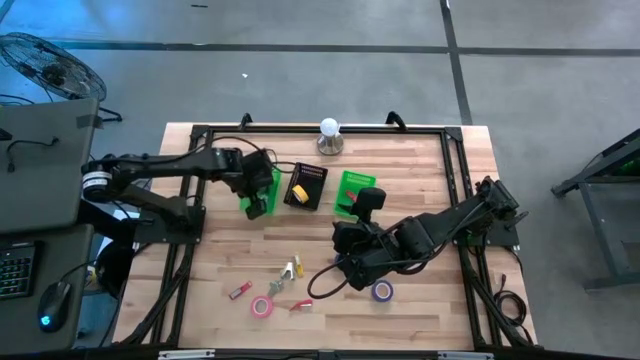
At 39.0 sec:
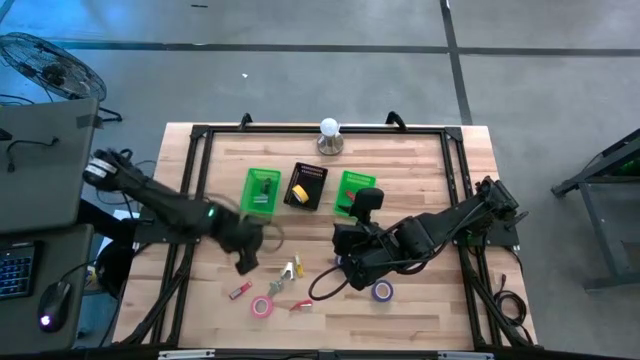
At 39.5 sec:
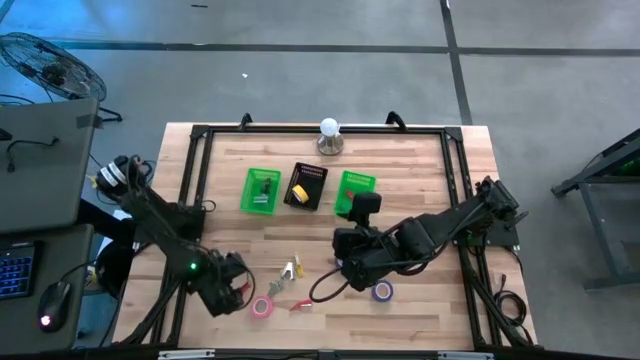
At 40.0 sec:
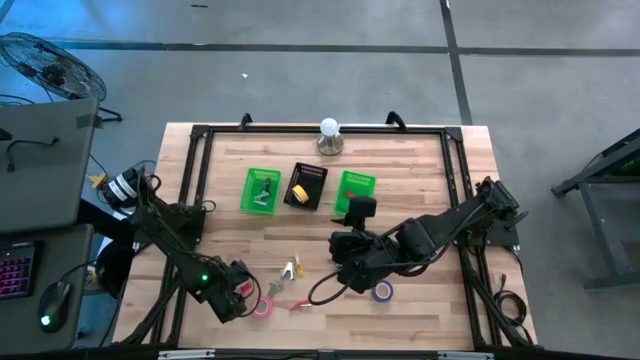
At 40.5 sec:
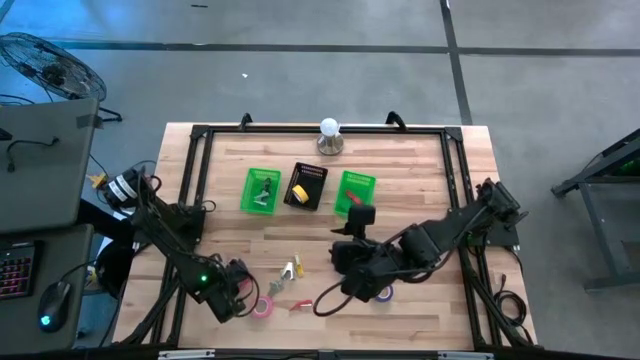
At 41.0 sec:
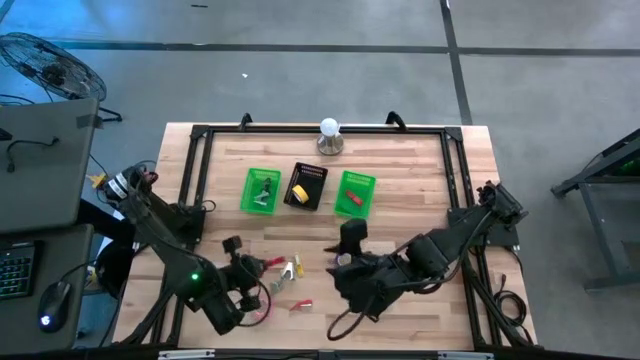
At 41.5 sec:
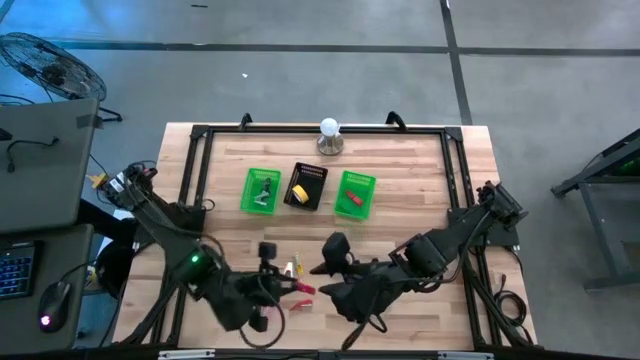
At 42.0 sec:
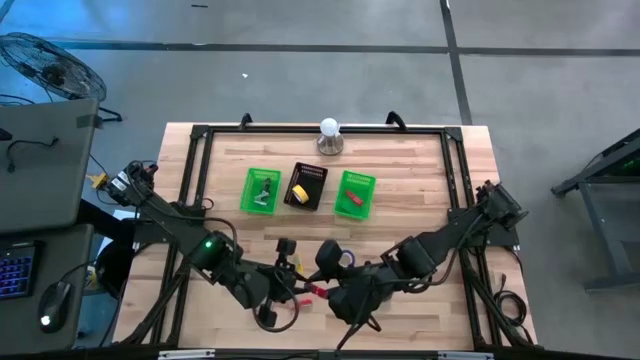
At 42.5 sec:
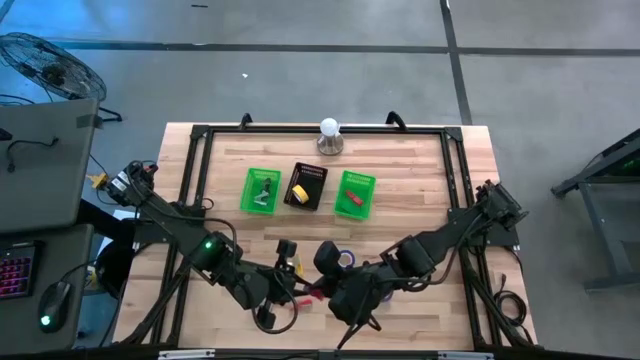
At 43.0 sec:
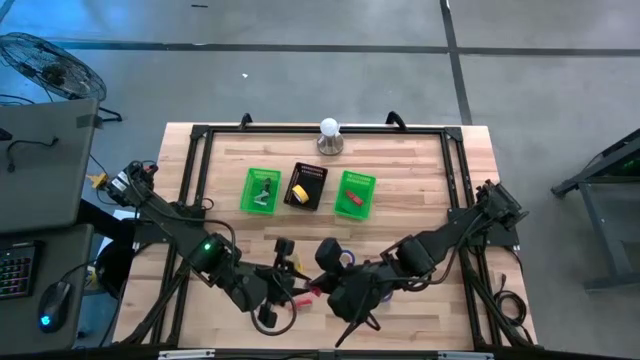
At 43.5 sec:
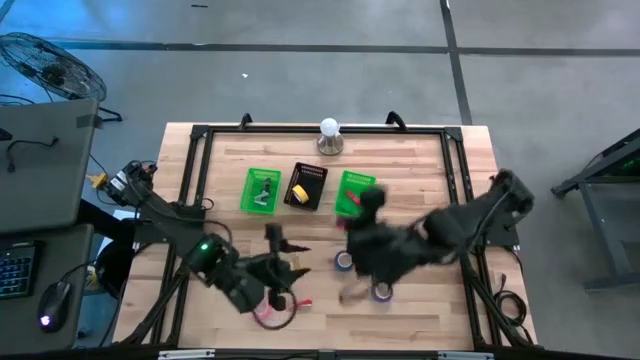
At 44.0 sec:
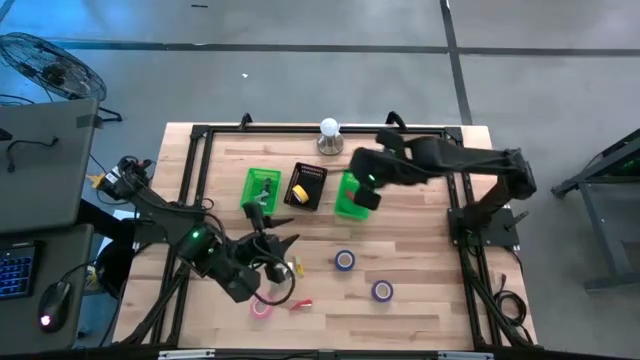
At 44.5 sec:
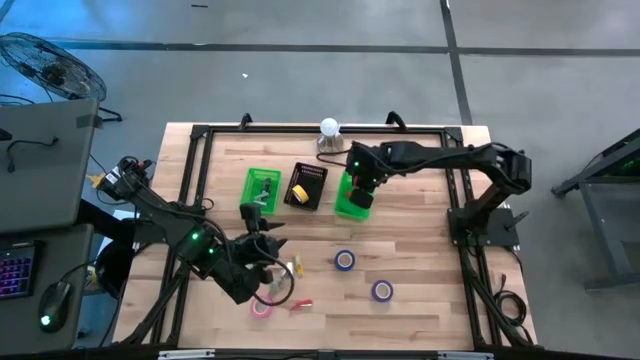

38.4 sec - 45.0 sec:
Task: Pick and place Stapler, Stapler remover, tape
Put the left red stapler into the right green bin

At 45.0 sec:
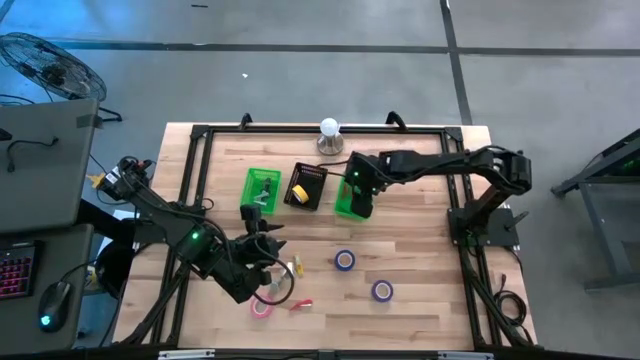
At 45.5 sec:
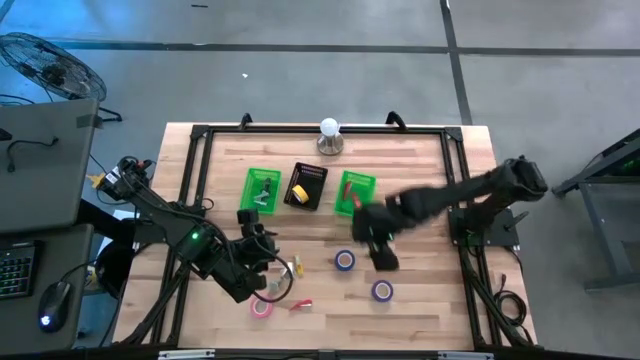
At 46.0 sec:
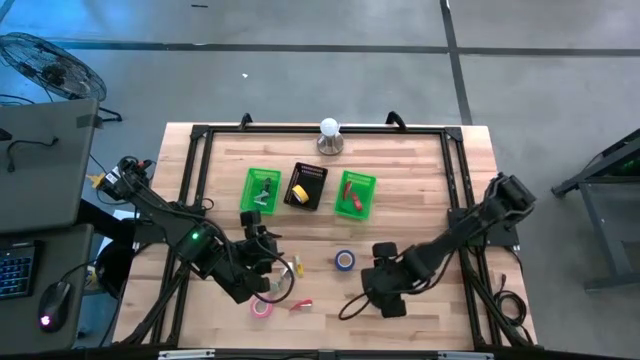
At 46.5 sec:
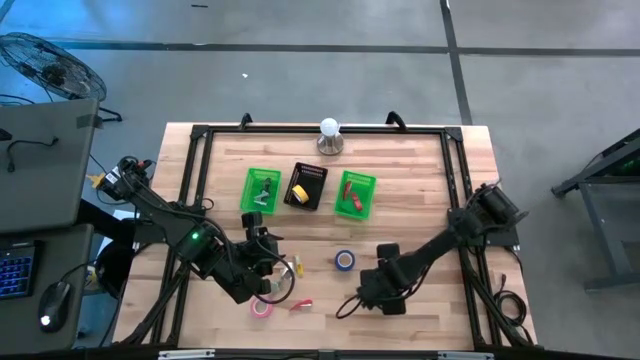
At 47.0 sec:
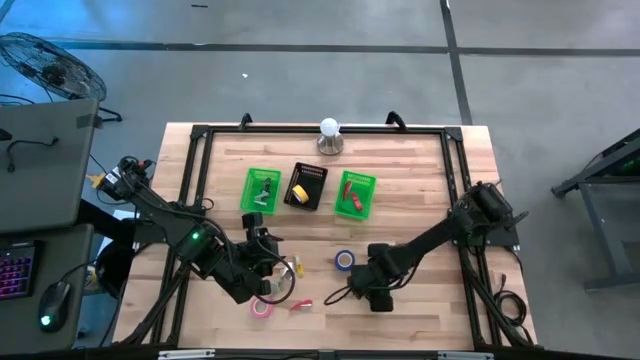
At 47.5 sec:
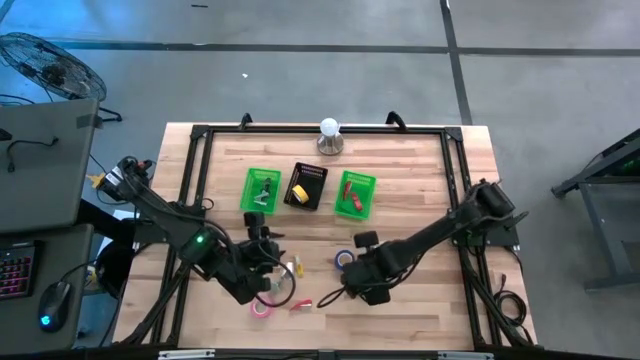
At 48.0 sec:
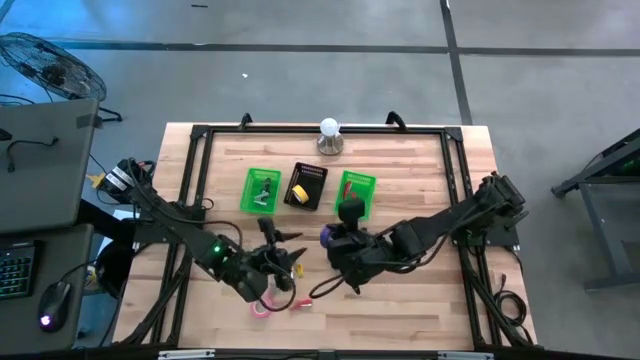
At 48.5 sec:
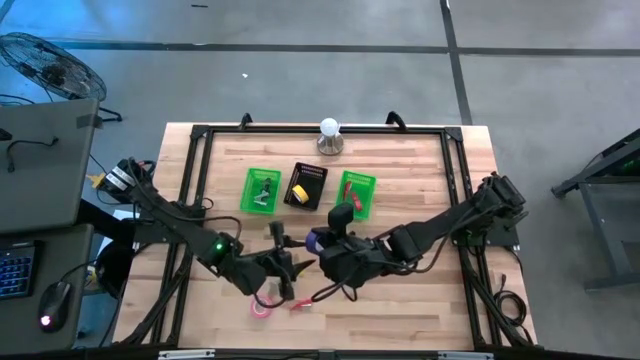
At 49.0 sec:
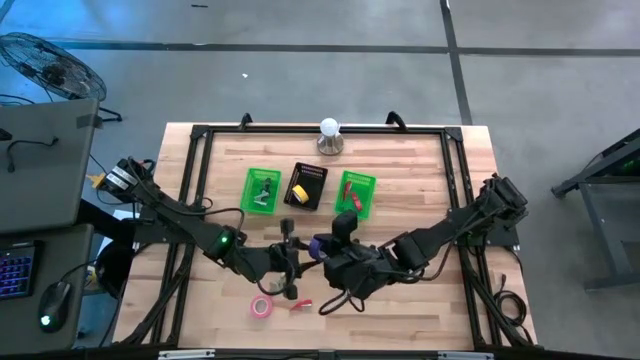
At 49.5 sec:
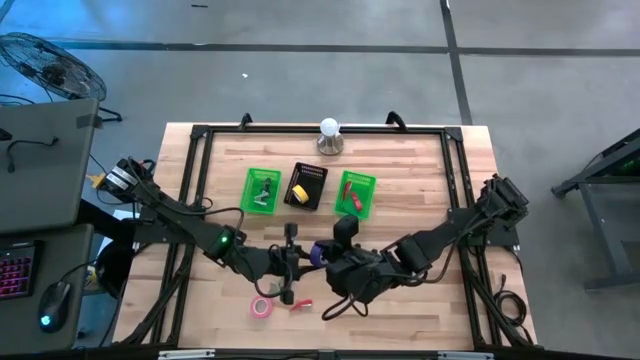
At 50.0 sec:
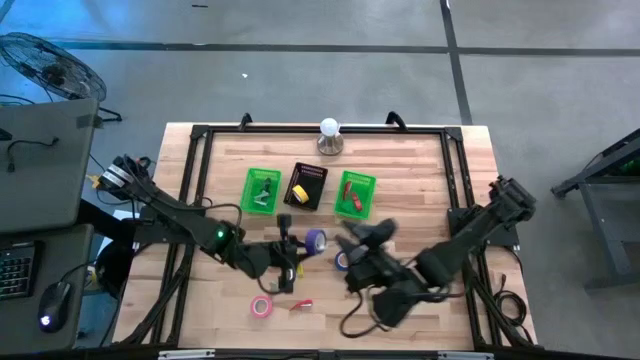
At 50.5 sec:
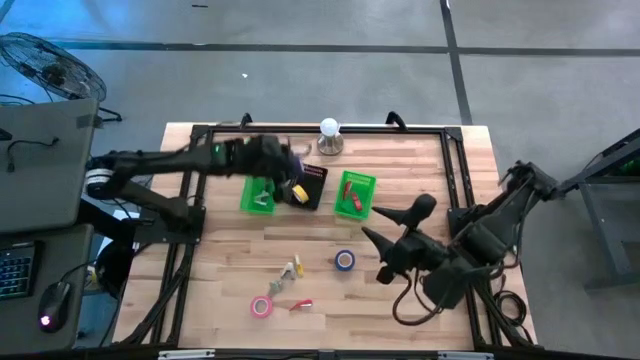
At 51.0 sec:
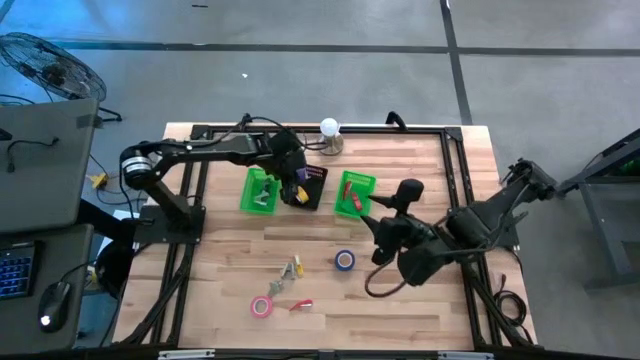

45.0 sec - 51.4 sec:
Put the right blue tape into the black bin

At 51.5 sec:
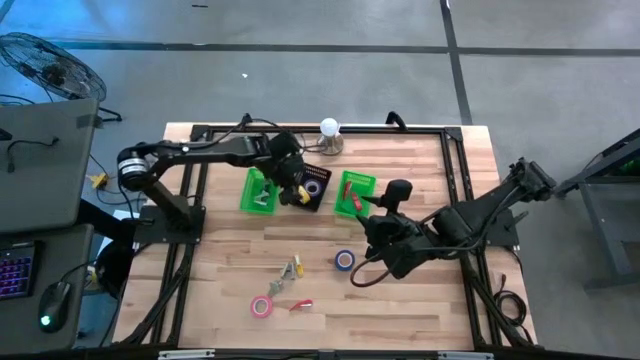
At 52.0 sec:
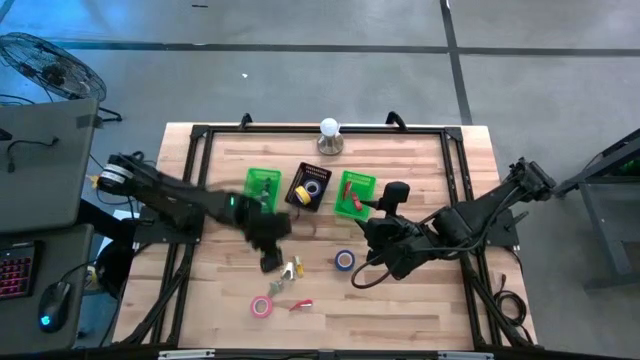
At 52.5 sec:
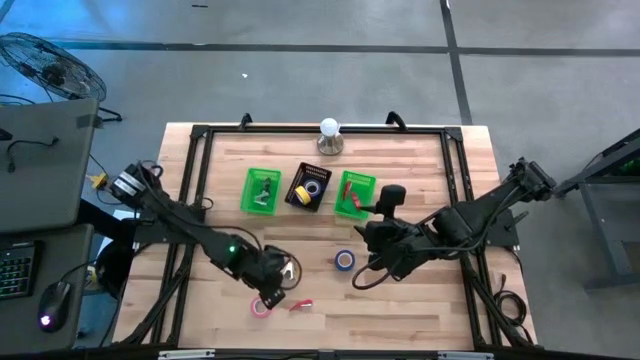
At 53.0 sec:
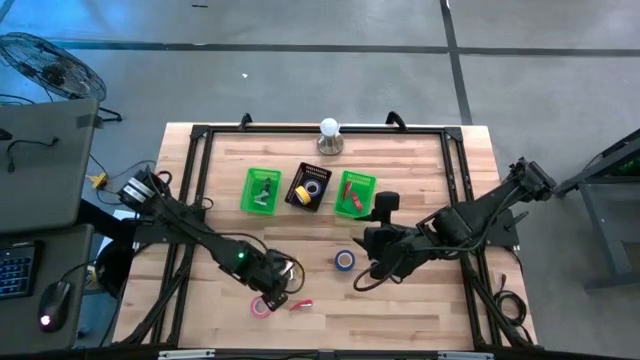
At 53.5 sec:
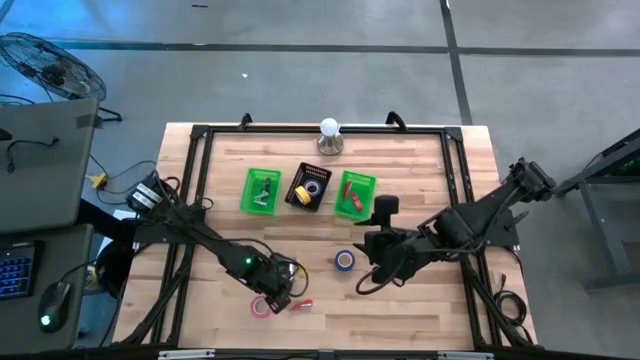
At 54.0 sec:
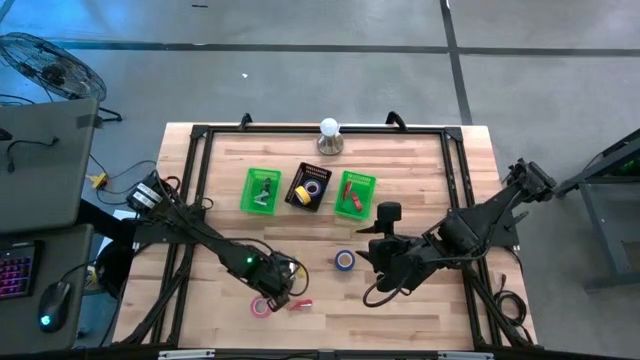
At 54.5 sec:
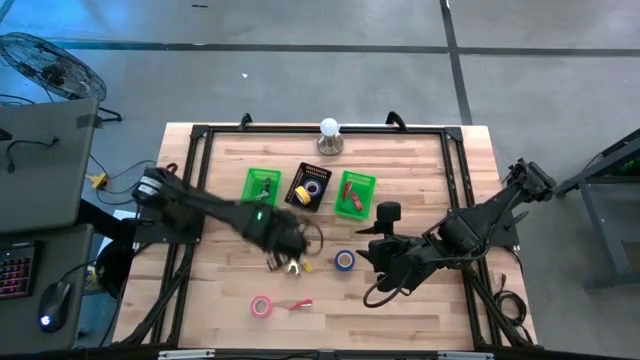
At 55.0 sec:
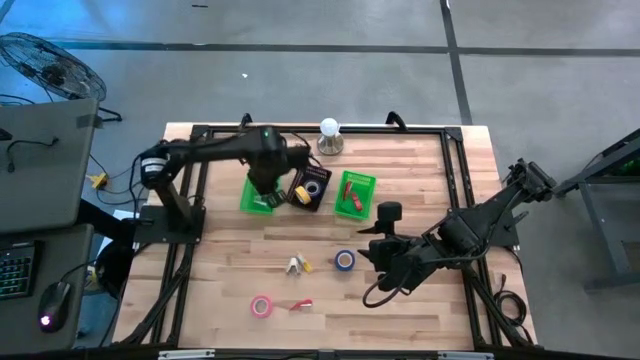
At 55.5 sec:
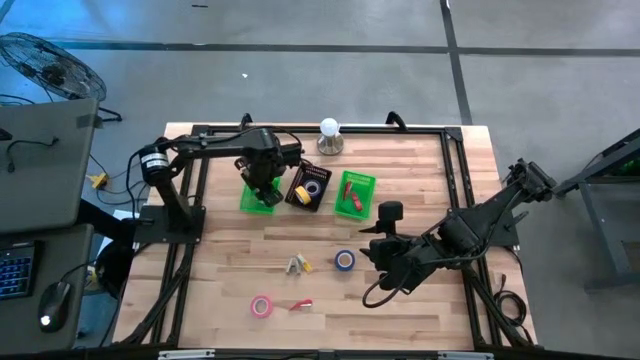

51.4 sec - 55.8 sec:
Put the bottom gray staple remover into the left green bin

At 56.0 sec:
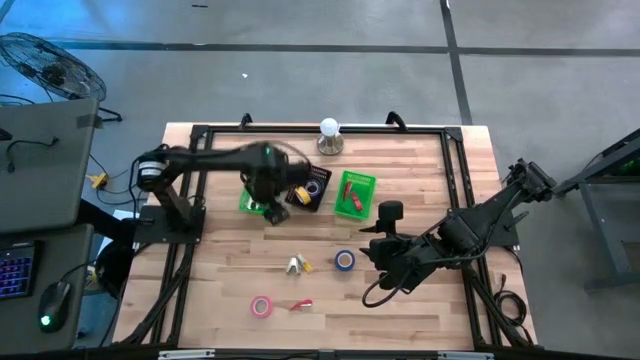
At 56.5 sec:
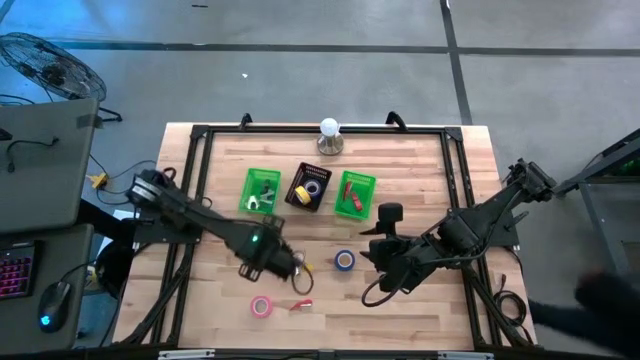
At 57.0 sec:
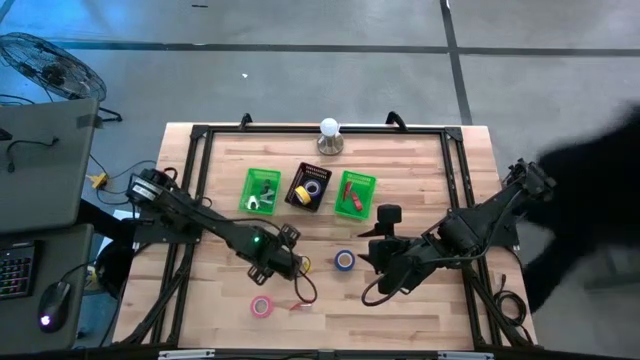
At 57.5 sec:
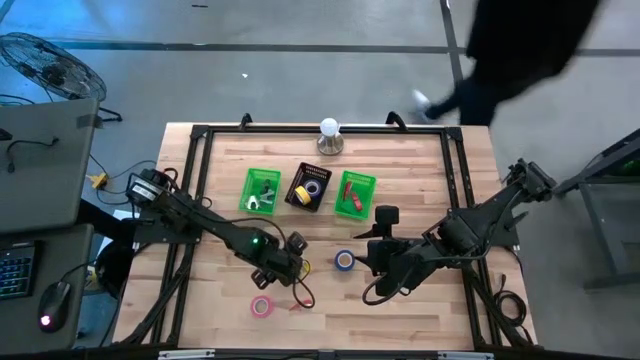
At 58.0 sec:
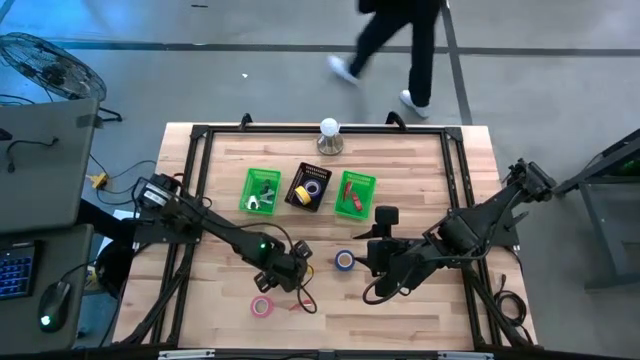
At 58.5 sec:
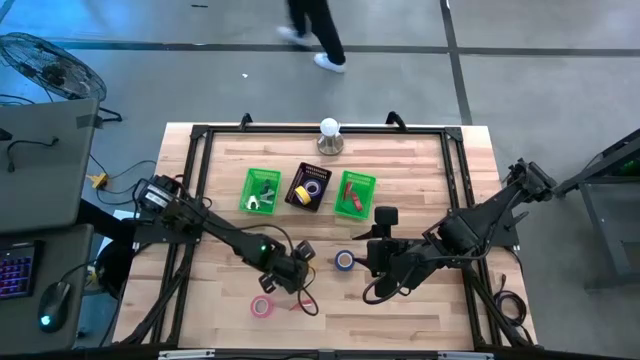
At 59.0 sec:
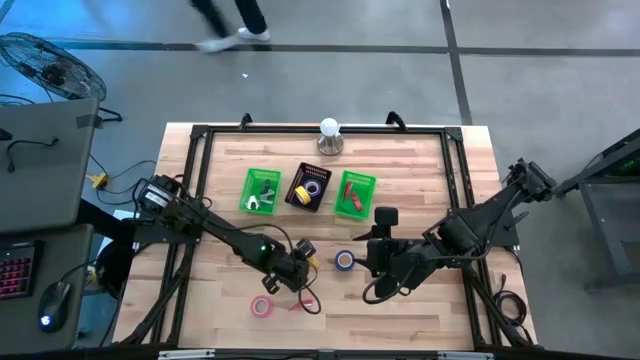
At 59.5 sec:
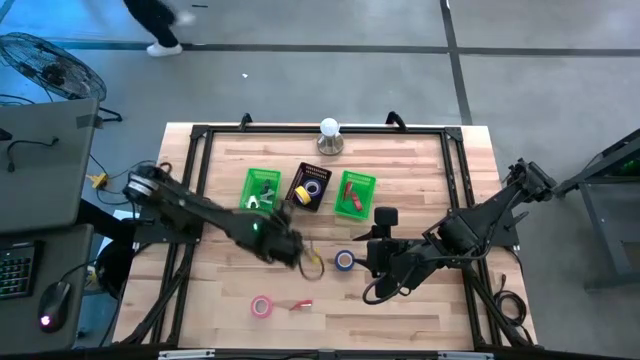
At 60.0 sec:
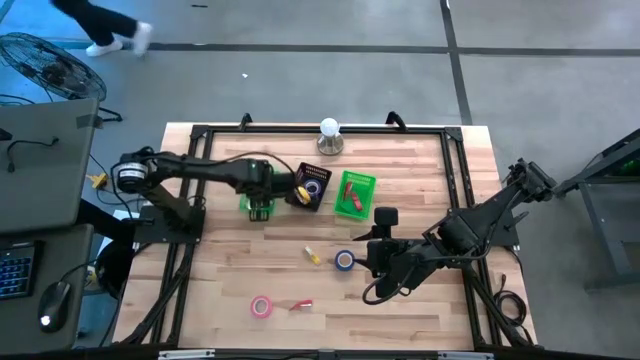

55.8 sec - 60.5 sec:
Put the gray staple remover into the left green bin
